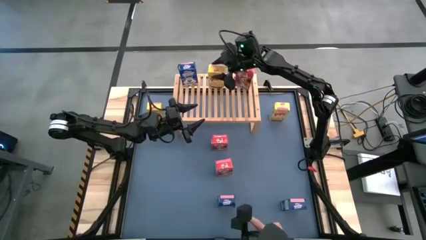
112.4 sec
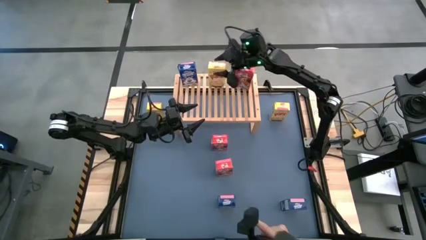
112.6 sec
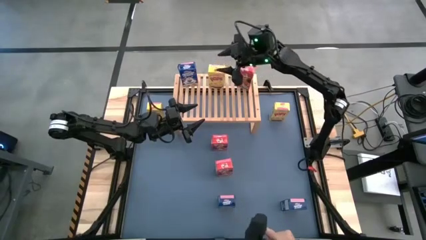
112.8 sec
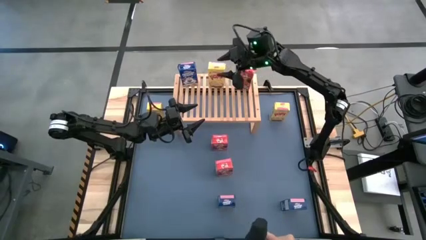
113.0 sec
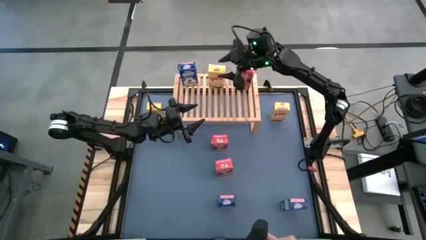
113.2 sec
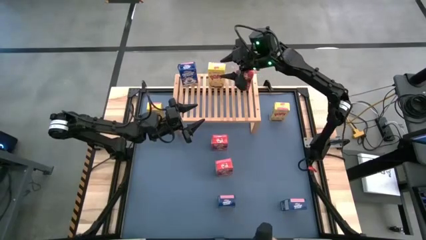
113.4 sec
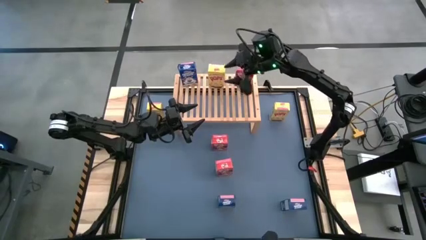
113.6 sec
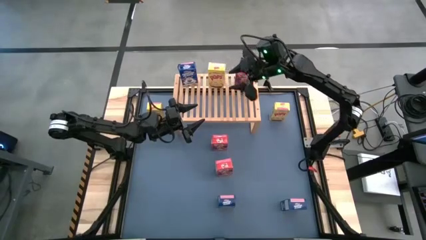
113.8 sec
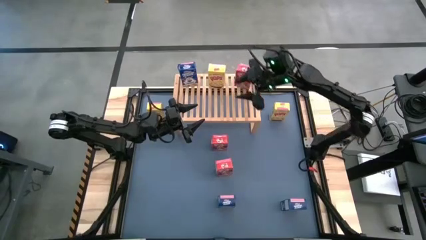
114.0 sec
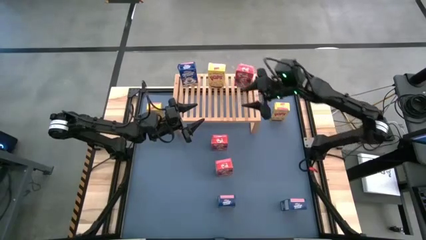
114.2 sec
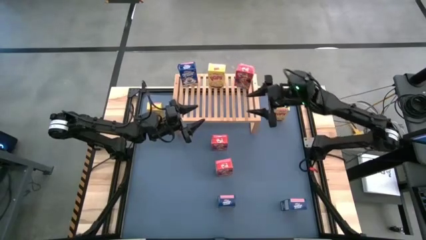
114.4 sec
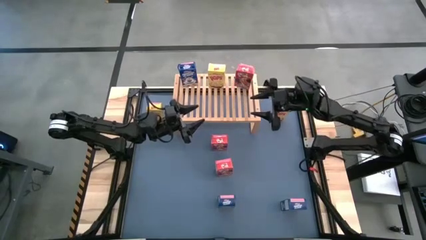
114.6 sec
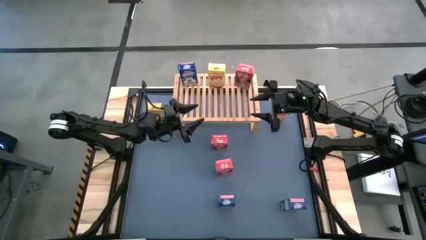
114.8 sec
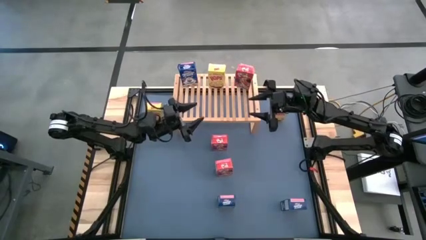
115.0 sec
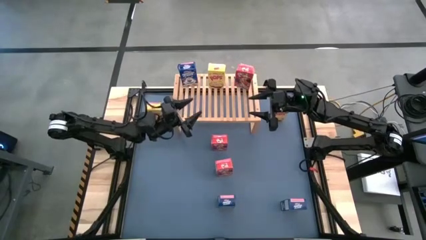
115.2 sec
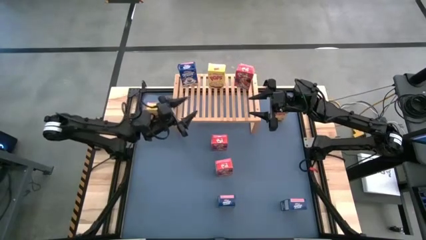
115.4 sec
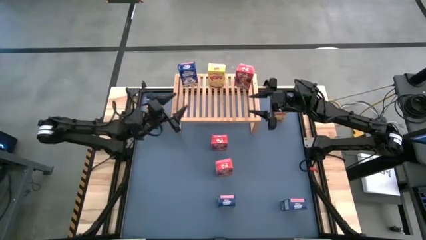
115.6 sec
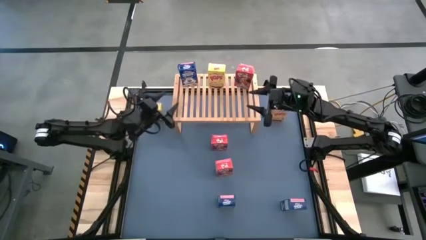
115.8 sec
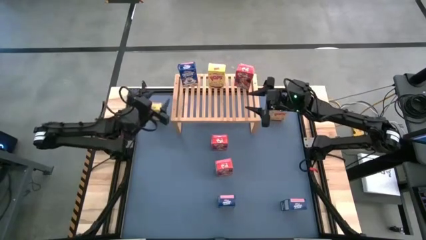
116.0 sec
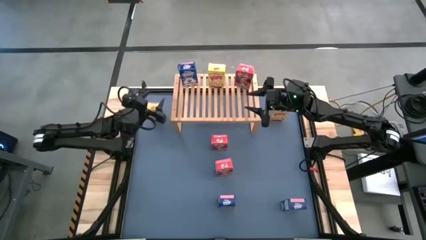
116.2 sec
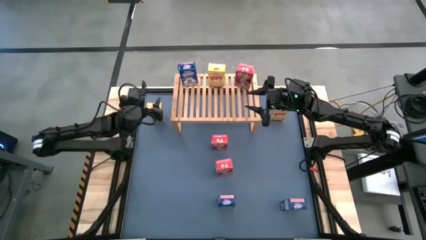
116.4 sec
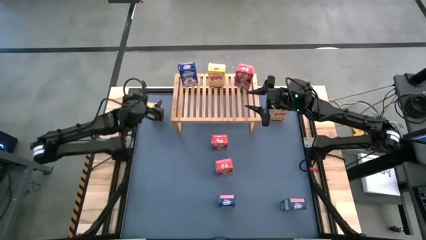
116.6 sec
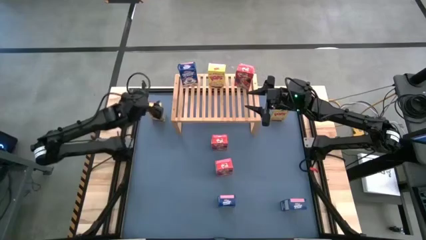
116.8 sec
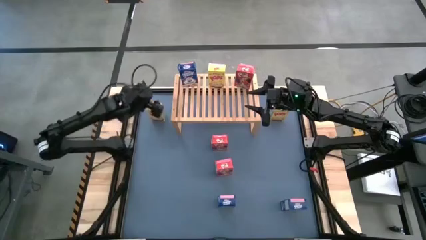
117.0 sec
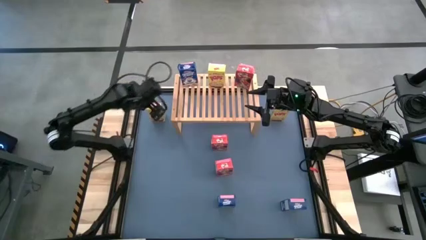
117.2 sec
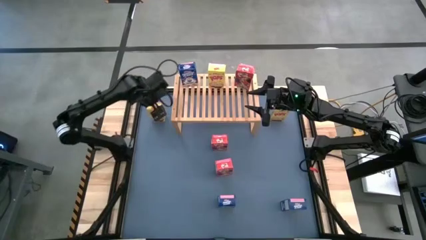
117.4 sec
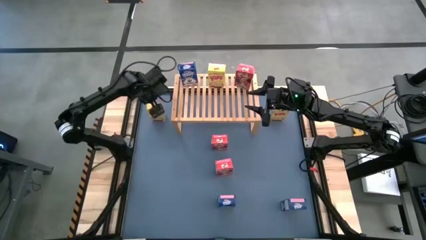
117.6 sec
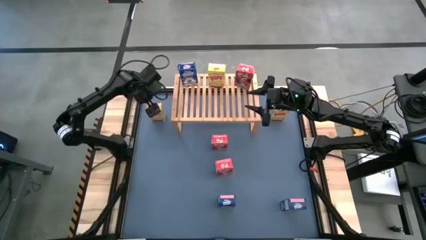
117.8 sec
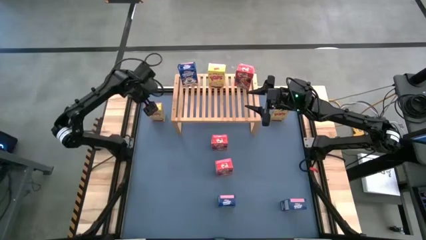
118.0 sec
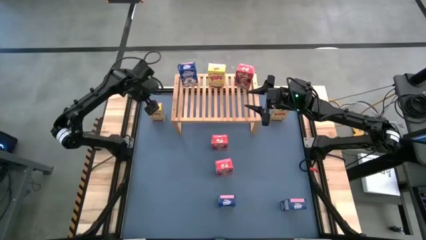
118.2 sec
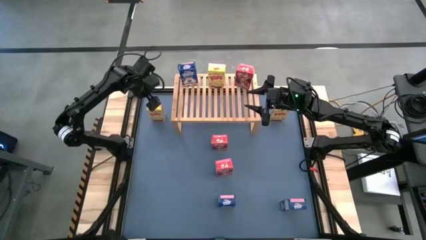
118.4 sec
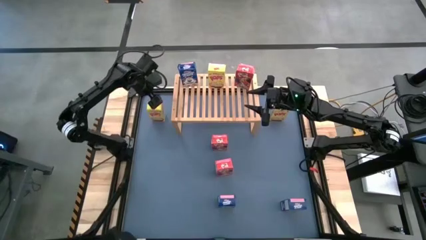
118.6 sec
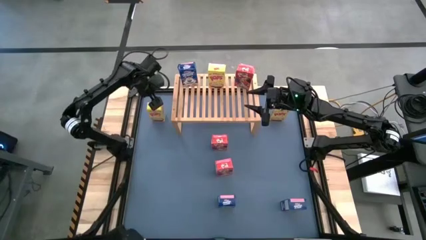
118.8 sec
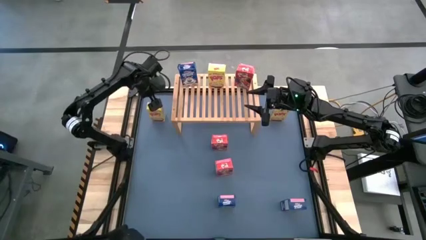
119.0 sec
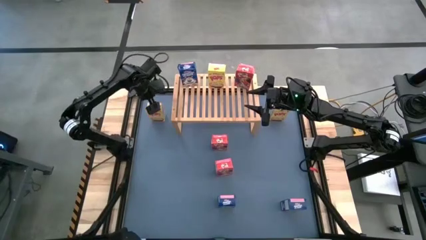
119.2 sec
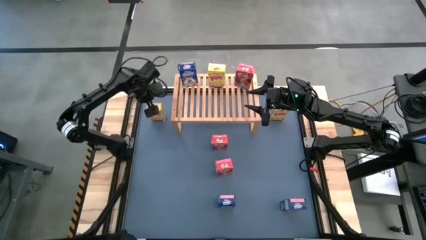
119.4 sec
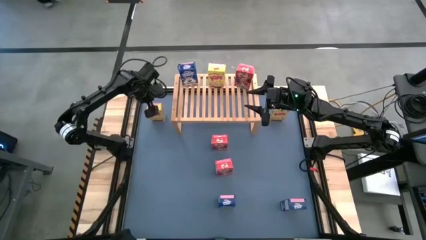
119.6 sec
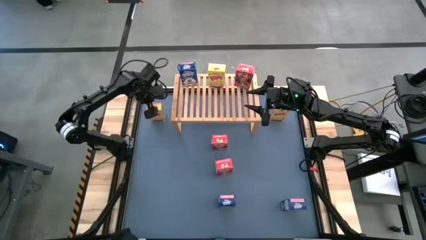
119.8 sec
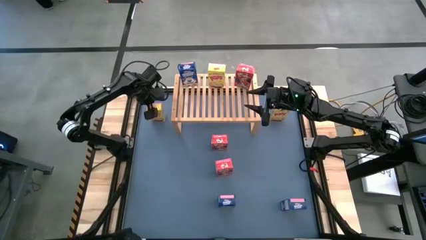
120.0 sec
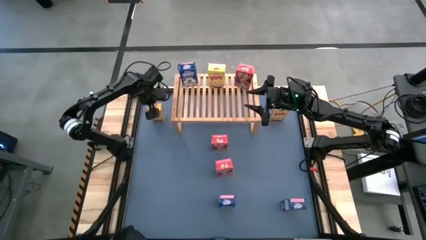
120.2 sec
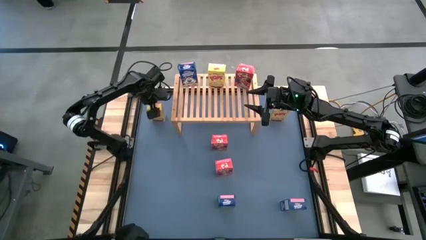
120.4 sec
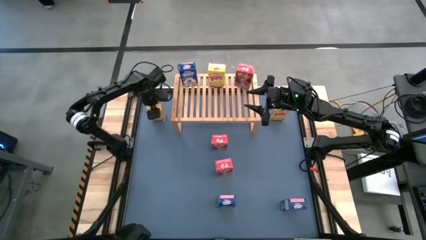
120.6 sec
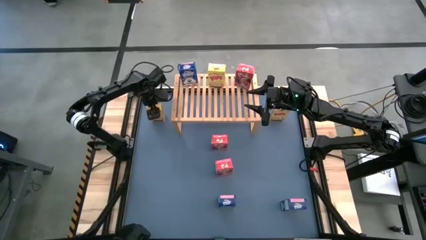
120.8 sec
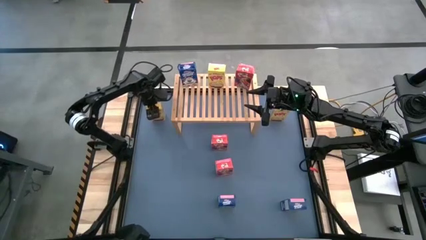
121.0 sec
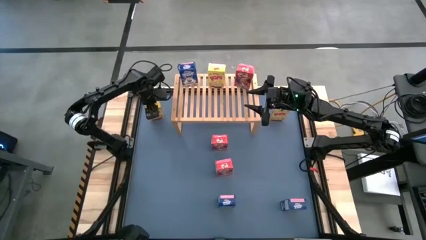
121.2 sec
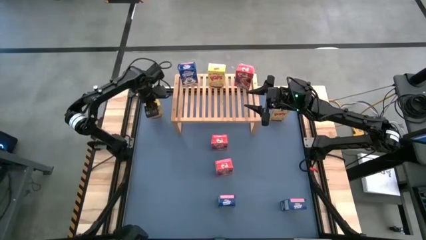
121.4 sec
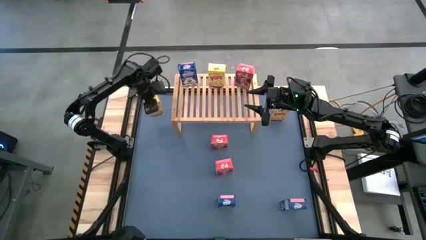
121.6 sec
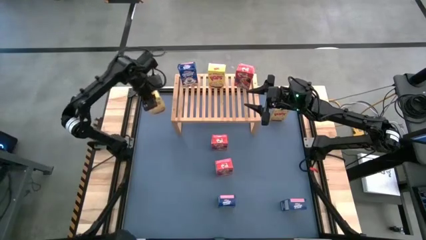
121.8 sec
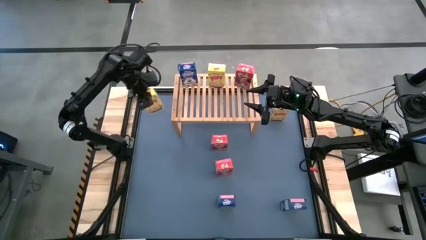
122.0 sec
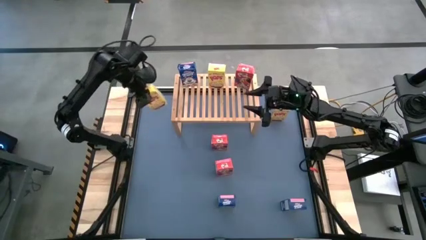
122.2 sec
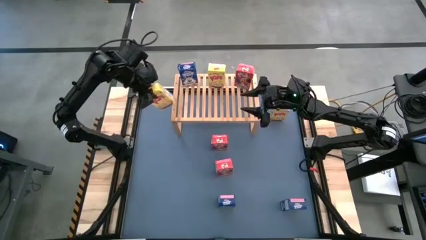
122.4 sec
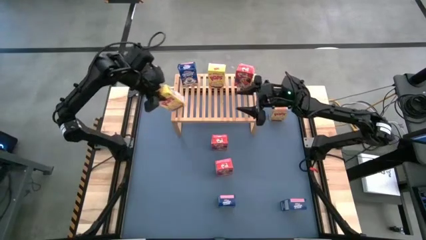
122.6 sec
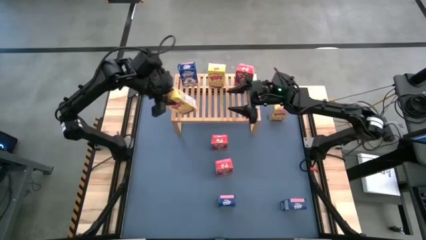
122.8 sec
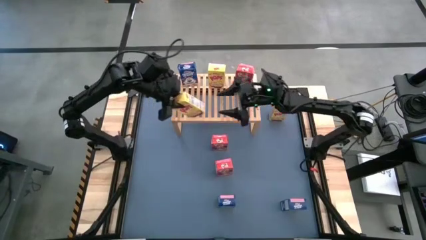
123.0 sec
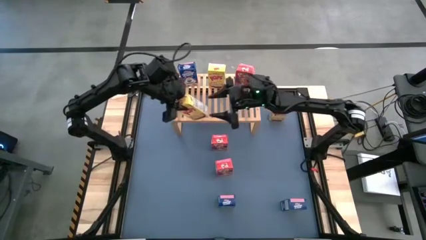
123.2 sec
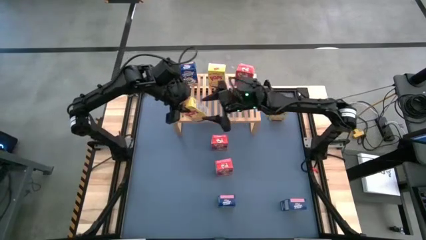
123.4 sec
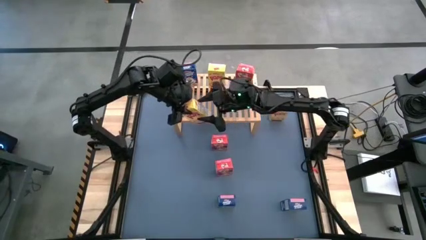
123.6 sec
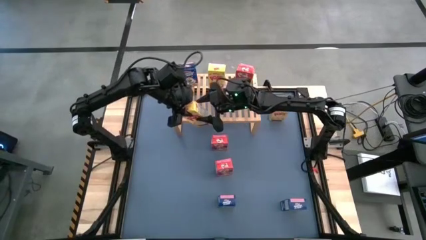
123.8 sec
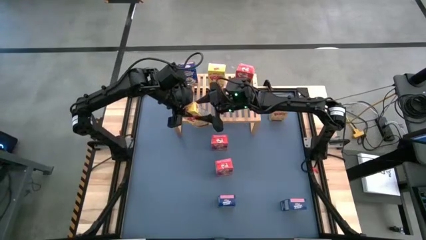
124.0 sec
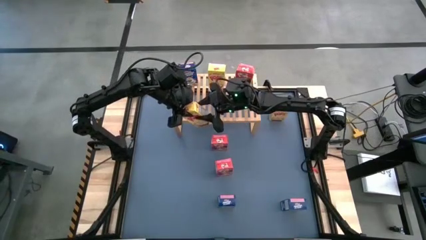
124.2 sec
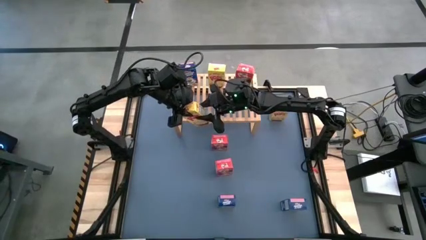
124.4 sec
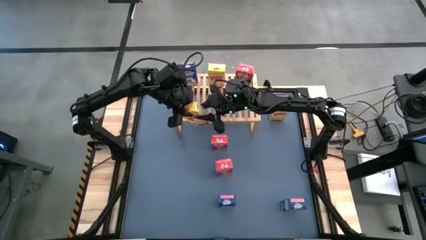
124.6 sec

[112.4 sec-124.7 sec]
Task: Stack cereal on shelf
Put the left yellow cereal box on the shelf aligned with the other yellow cereal box

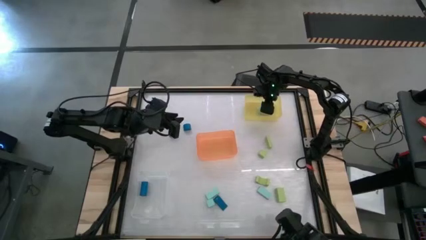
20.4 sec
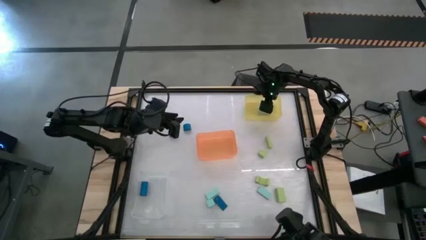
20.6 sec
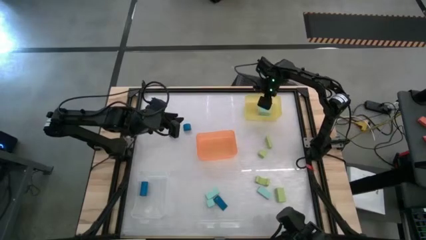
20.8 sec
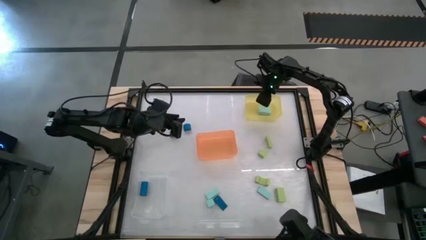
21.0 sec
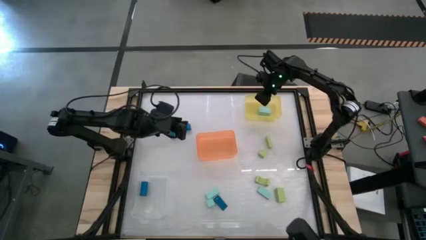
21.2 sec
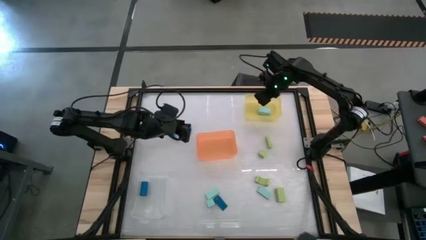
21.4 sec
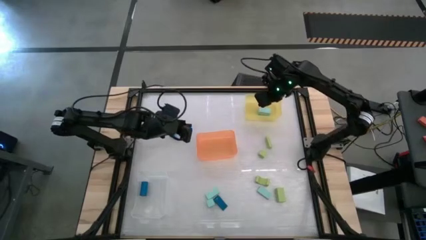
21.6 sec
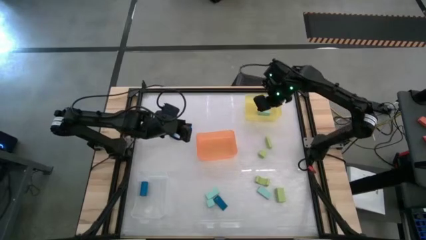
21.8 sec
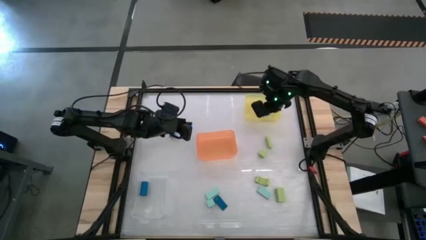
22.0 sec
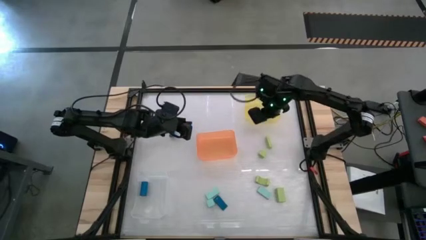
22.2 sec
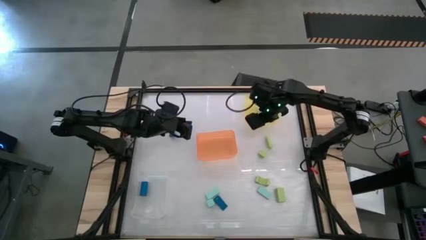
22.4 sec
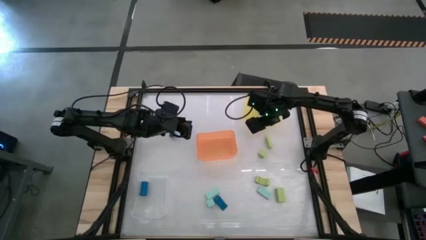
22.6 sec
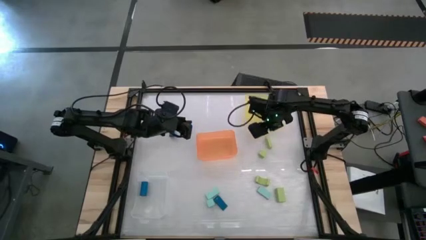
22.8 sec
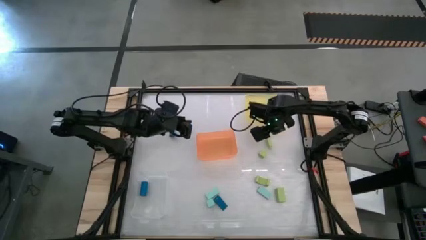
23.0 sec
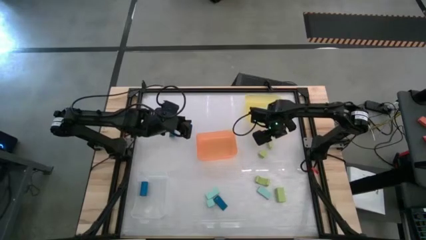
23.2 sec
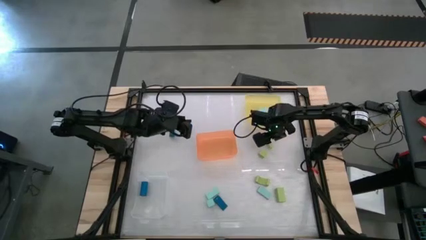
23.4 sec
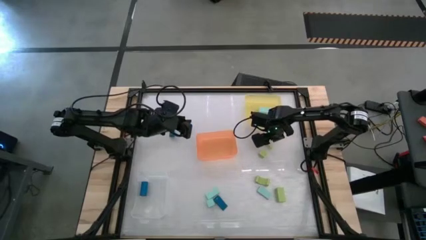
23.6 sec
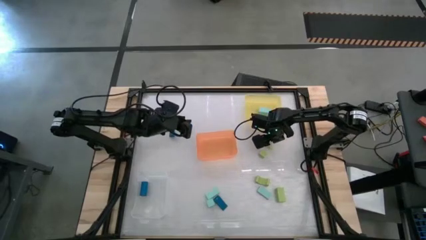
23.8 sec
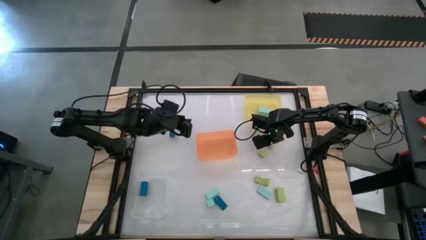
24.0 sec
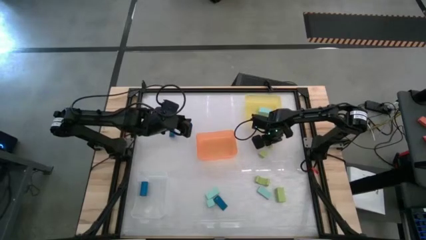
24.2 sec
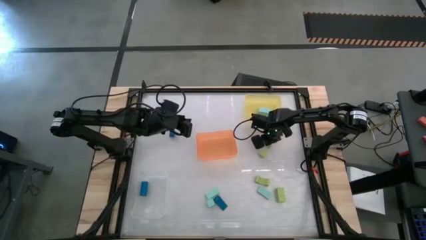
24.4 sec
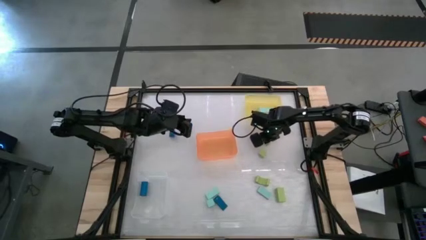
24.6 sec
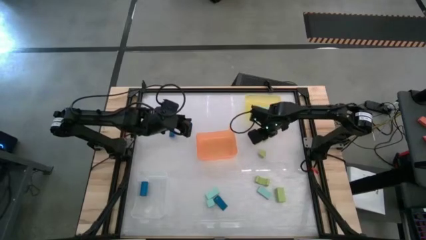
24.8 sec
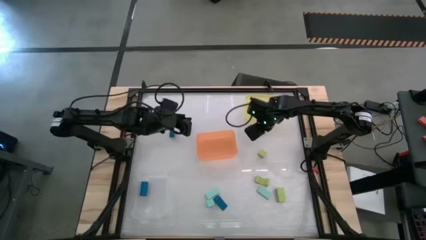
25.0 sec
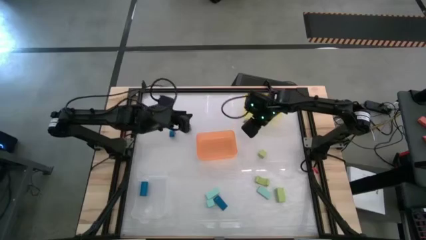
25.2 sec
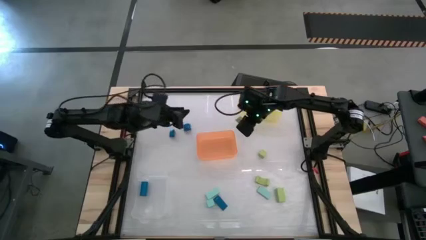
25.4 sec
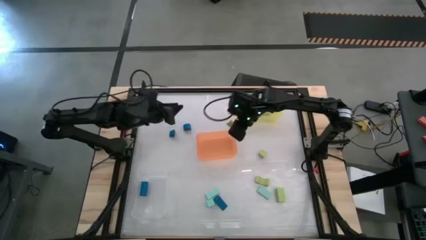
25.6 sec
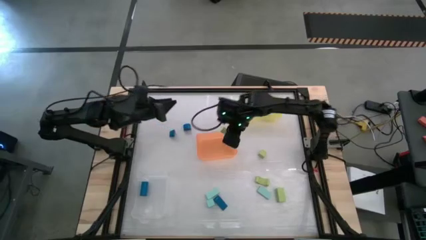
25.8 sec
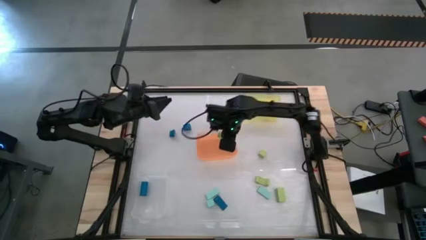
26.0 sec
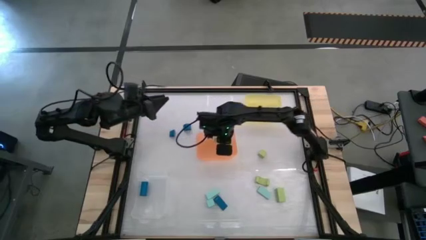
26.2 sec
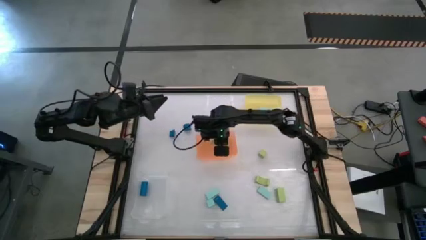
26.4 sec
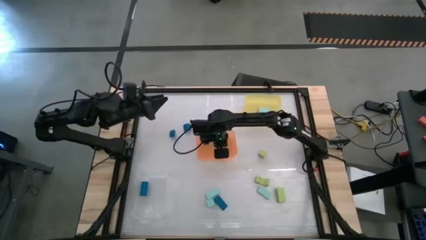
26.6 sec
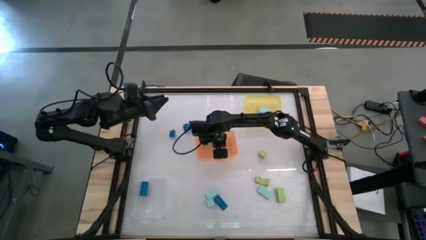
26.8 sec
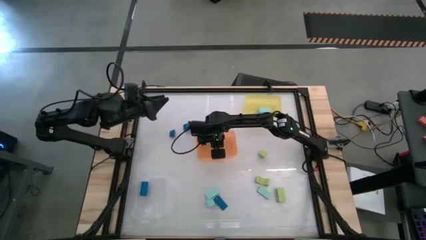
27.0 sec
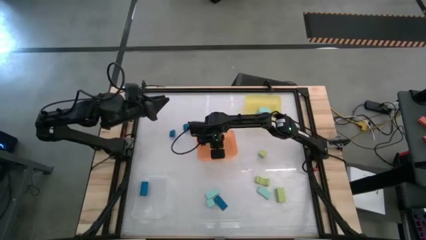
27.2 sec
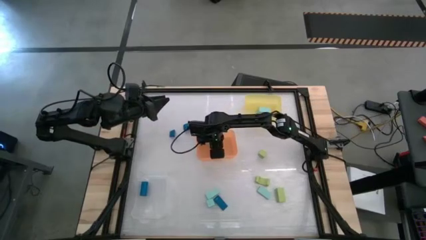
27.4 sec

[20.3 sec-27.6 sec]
Task: Sort & place blocks by color
Put the light green block into the orange bin
